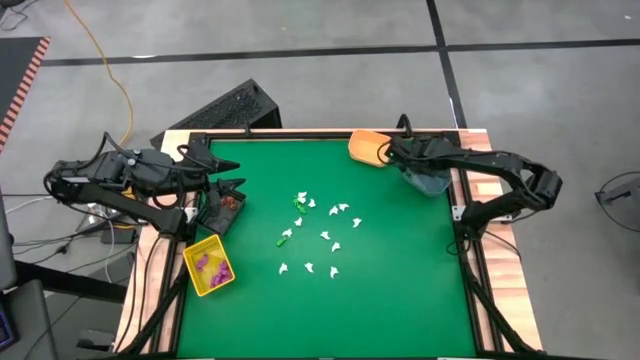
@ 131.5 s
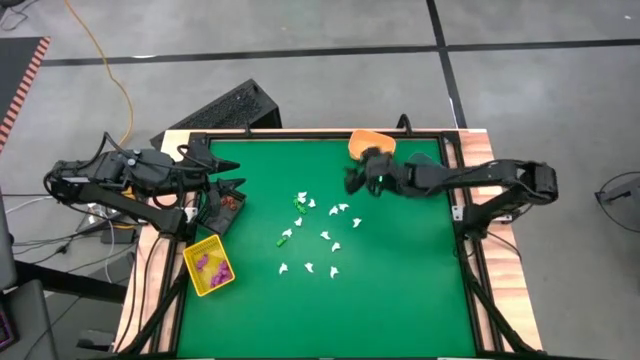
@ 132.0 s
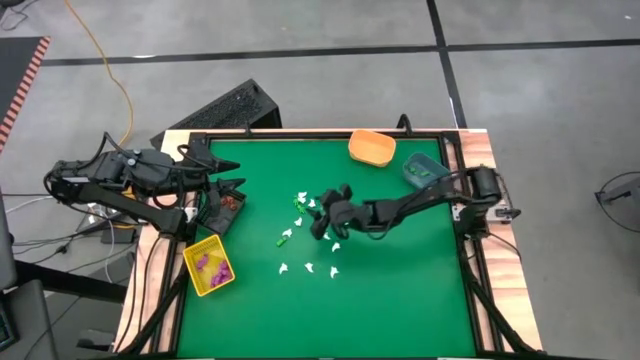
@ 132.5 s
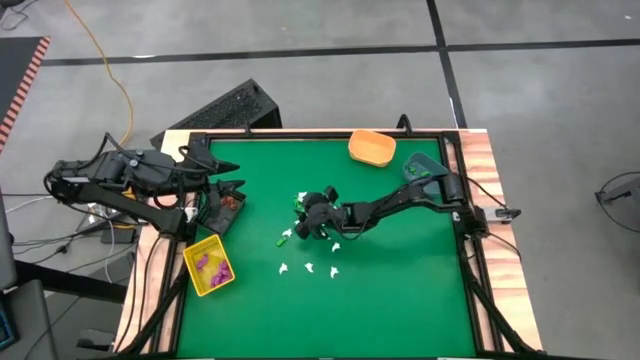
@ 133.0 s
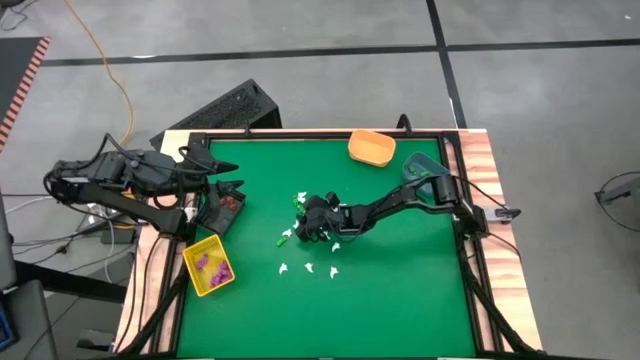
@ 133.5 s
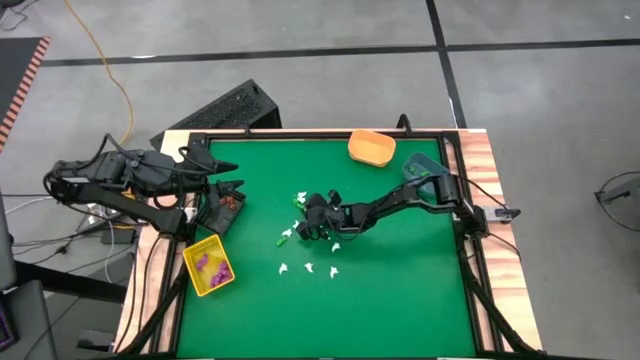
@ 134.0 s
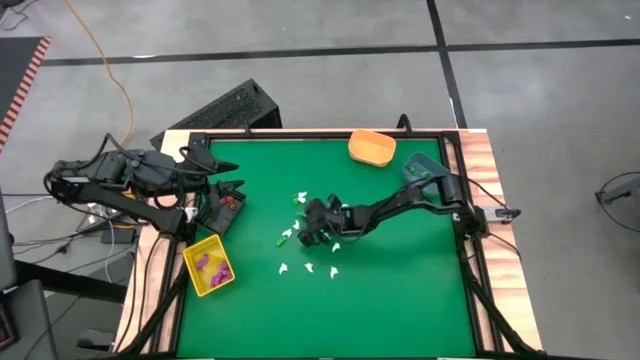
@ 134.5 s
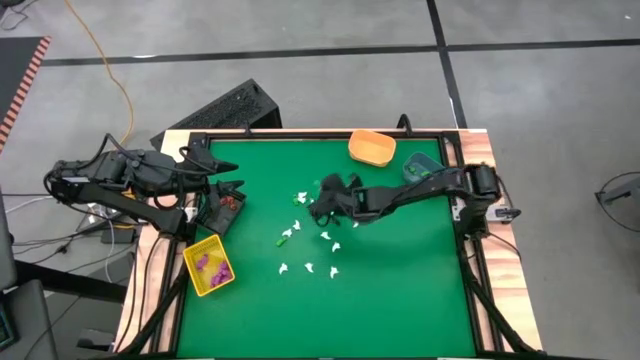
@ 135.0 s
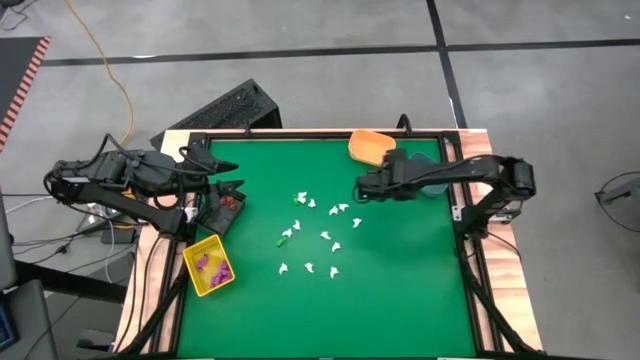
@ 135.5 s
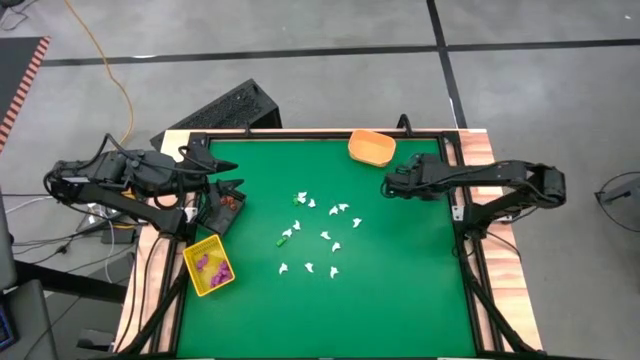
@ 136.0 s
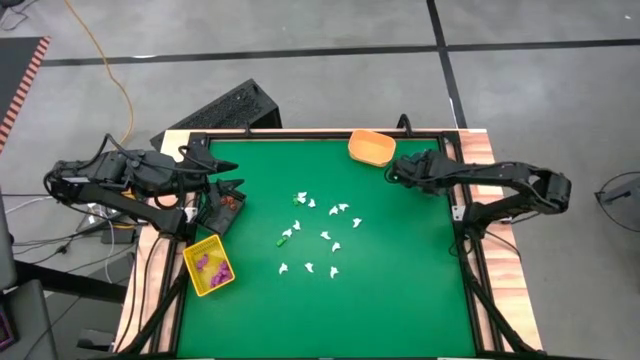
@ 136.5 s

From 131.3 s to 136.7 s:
Task: Sort Halloween decoration
Put the green skeleton toy into the gray bin

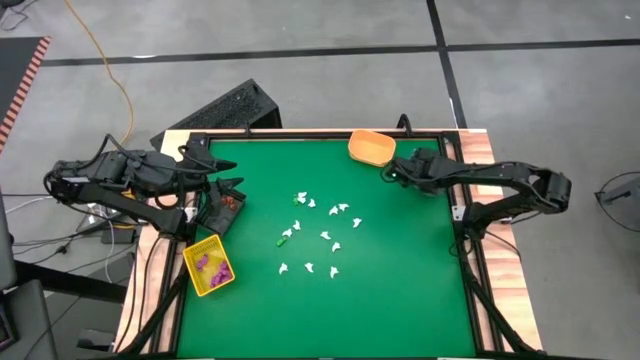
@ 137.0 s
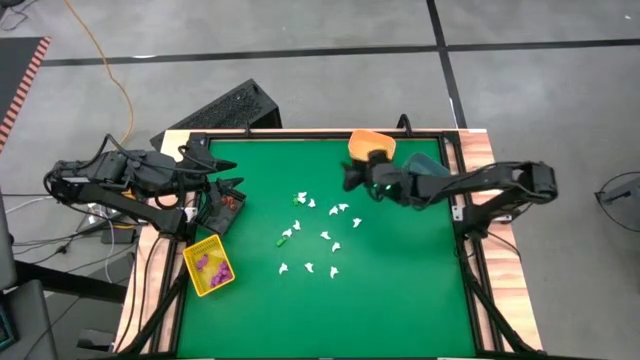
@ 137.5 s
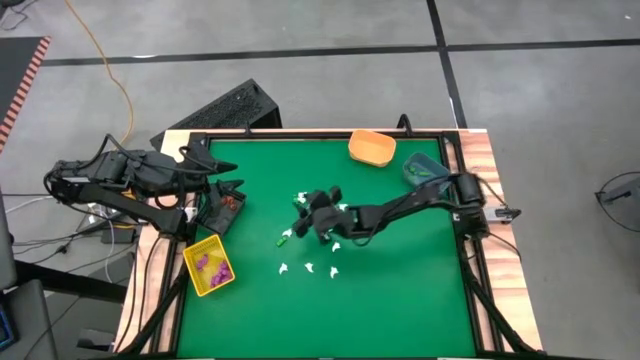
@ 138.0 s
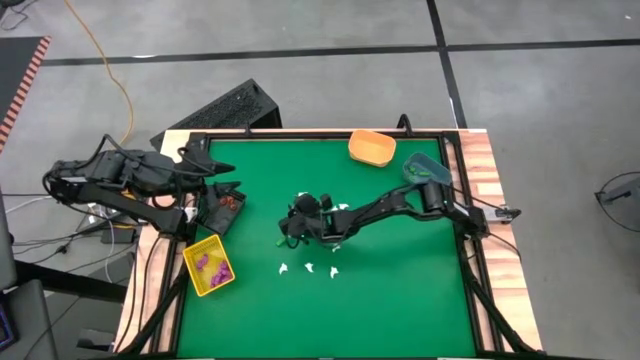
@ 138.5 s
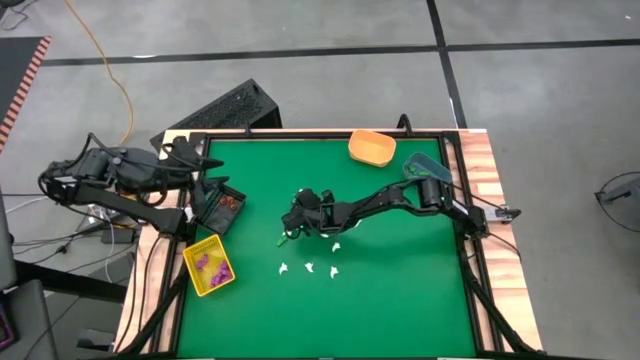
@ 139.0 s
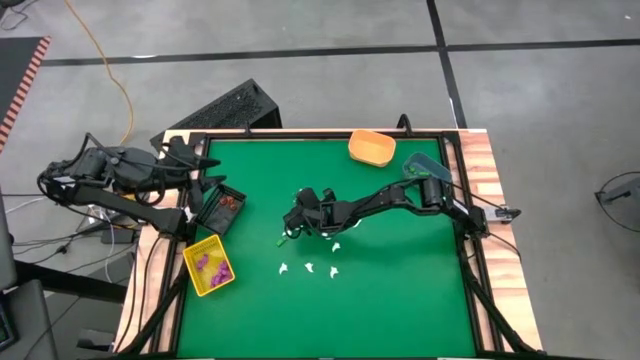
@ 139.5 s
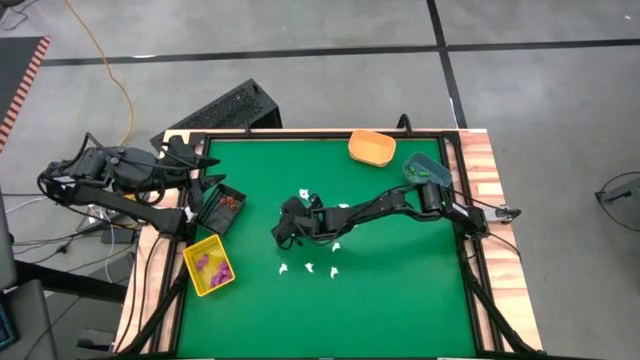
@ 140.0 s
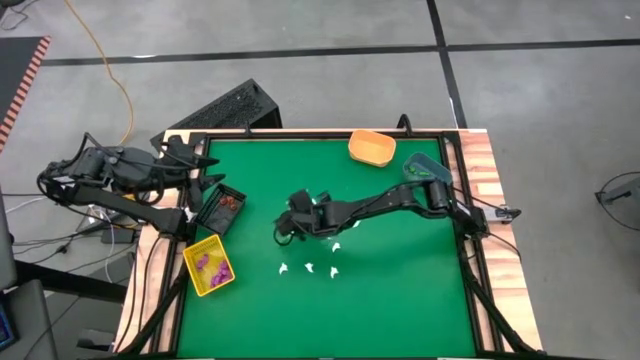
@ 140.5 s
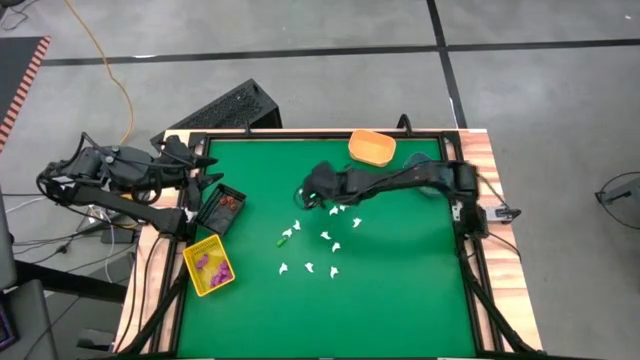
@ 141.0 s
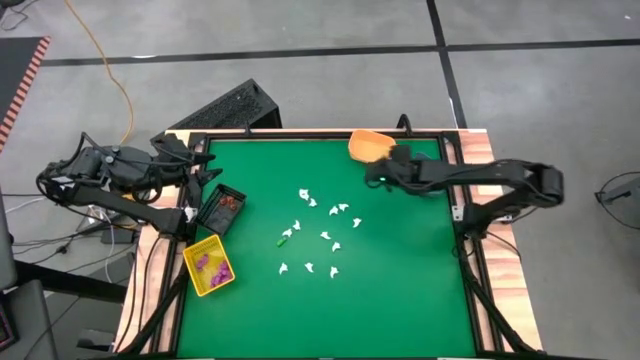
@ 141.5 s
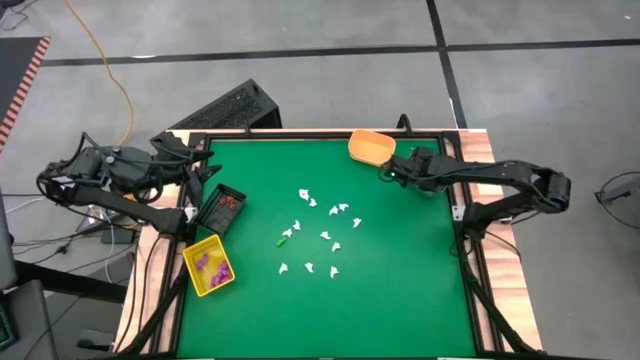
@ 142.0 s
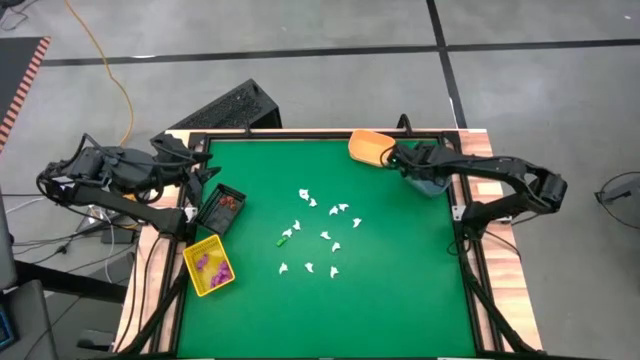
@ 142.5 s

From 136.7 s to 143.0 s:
Put the green skeleton toy into the gray bin

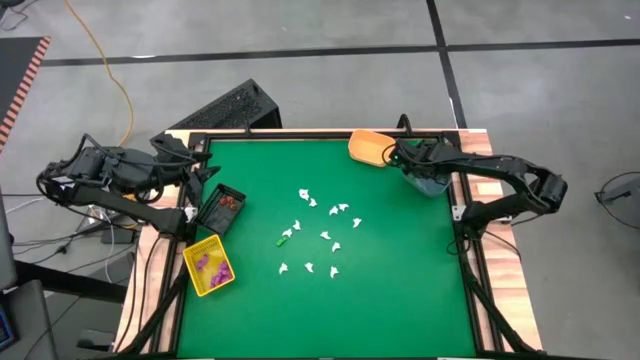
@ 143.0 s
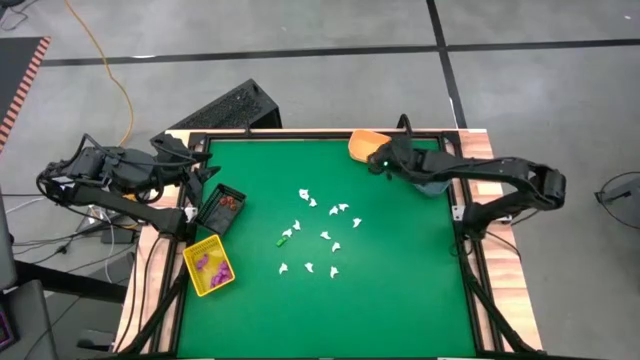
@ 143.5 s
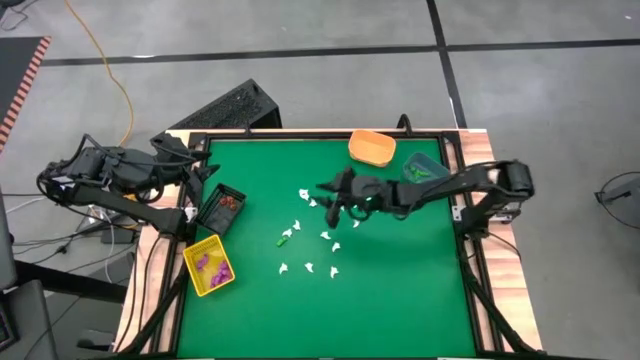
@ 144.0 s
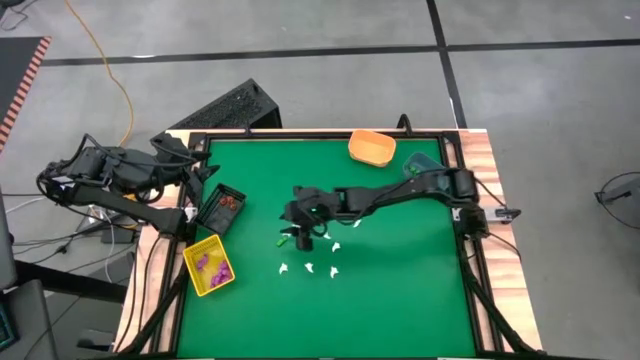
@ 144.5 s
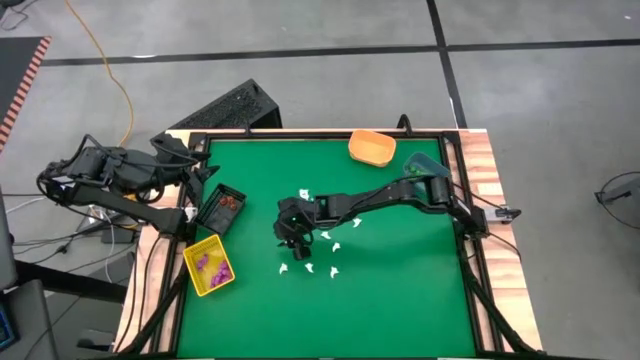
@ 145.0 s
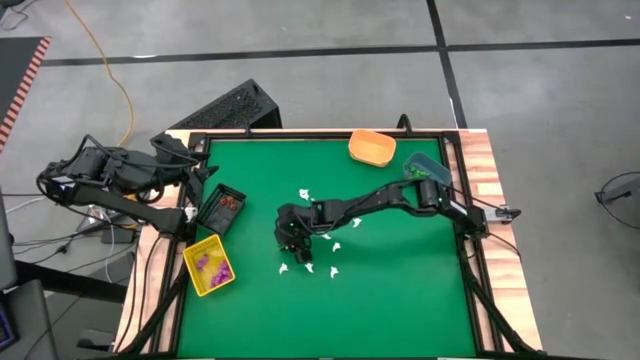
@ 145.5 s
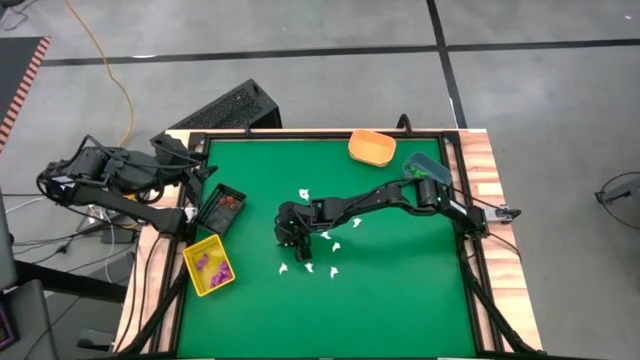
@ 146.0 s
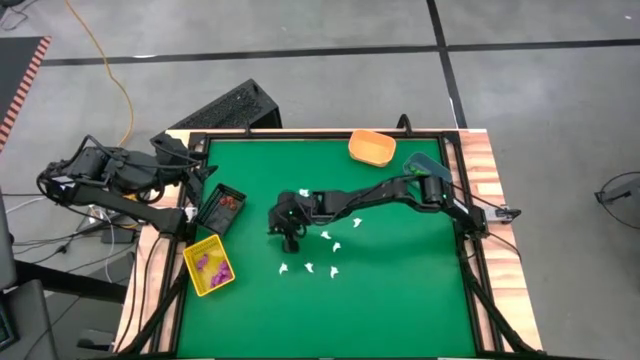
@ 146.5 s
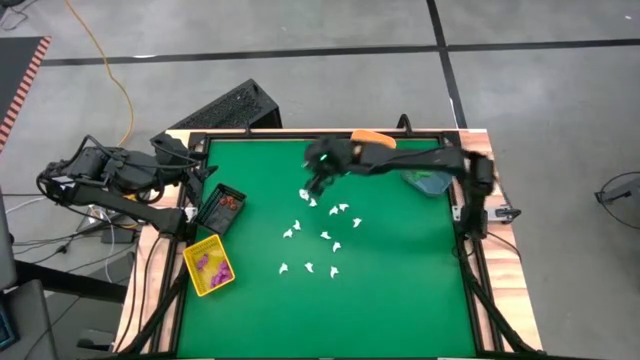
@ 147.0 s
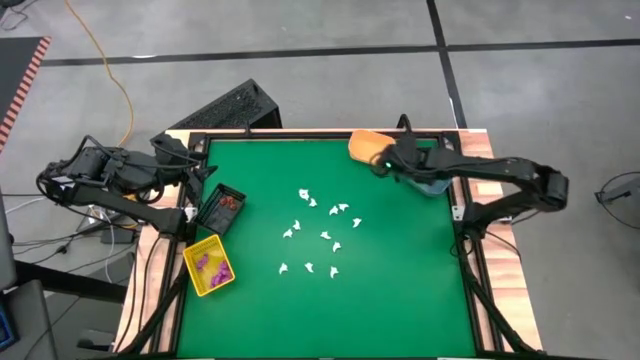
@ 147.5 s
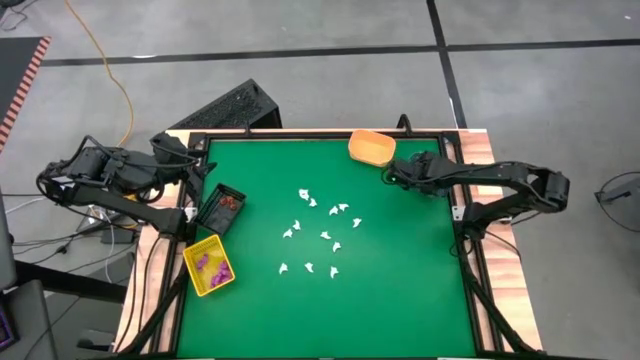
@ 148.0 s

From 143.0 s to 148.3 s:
Put the green skeleton toy into the gray bin

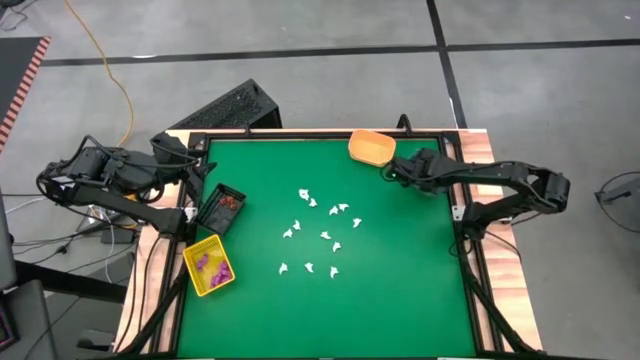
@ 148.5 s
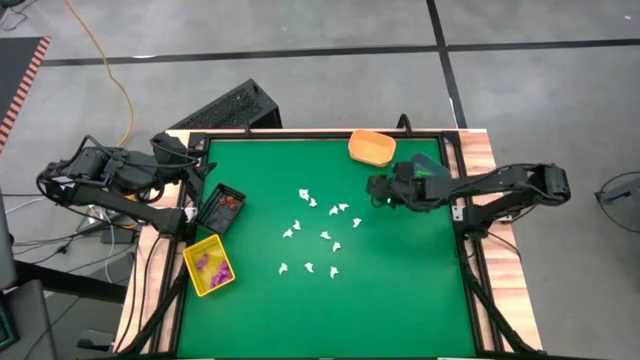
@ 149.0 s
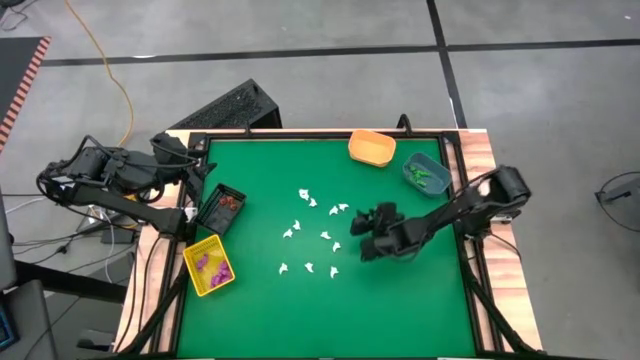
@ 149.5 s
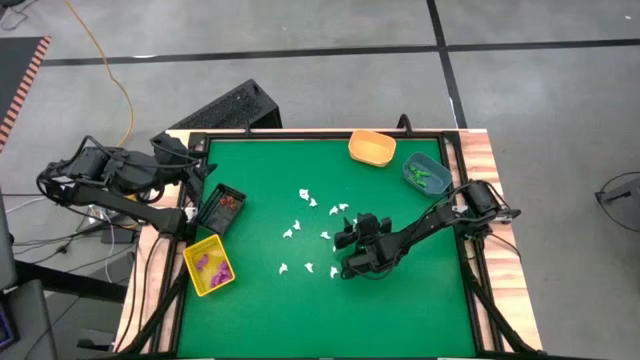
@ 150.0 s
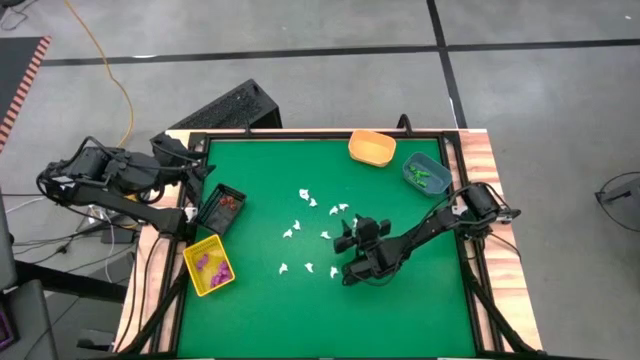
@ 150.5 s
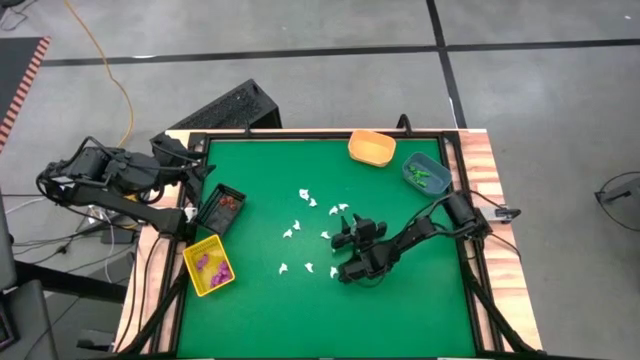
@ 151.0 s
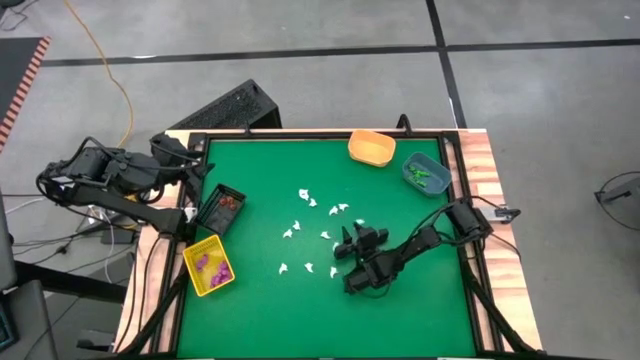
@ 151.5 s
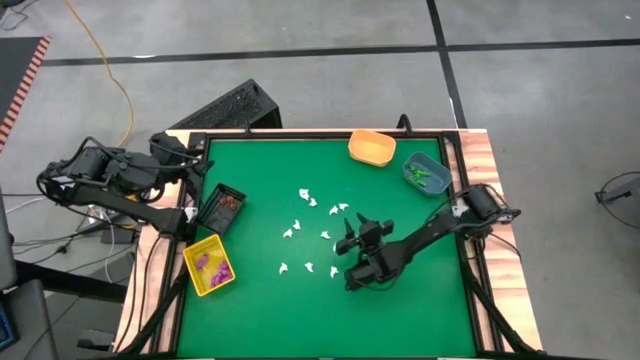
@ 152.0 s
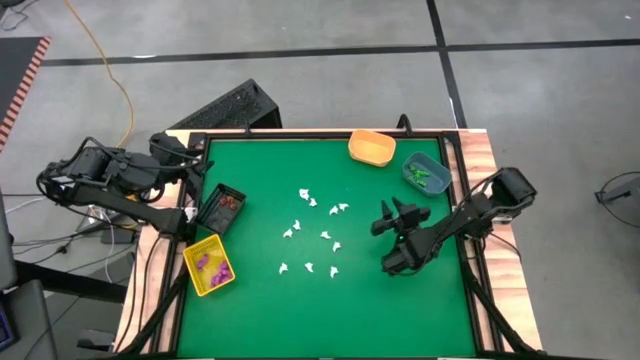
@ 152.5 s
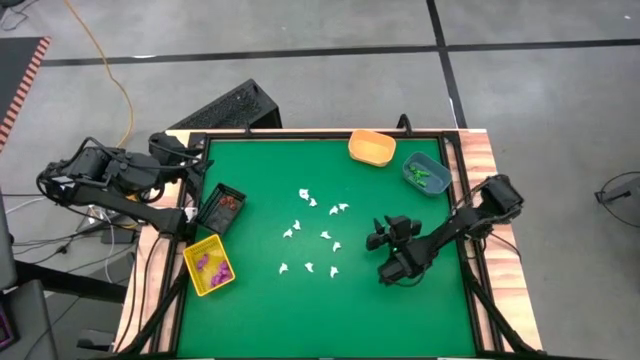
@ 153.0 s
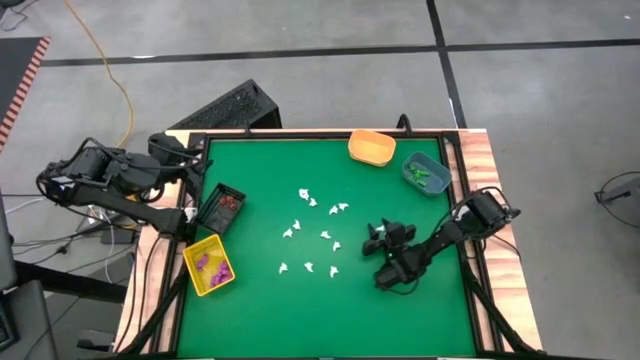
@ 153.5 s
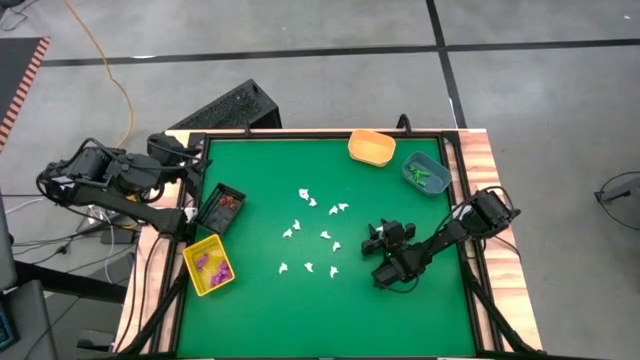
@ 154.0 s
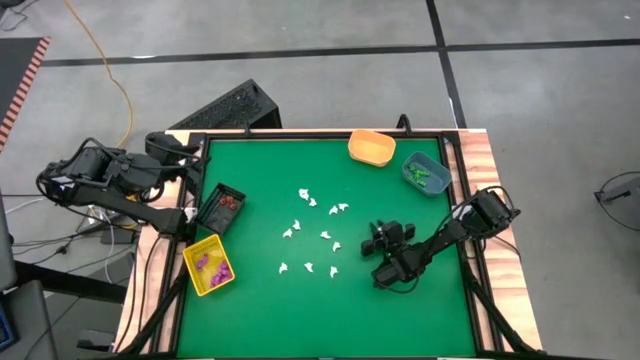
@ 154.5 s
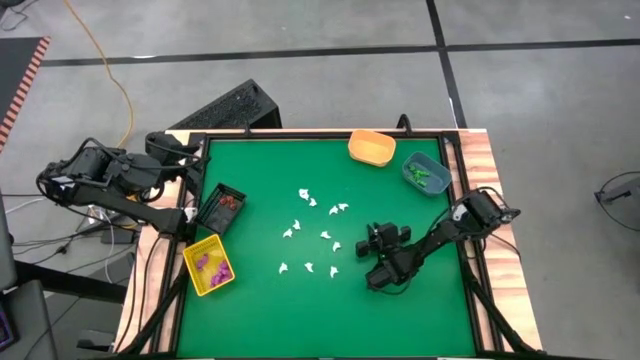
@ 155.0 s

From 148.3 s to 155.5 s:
Put the white ghost toy into the light orange bin
